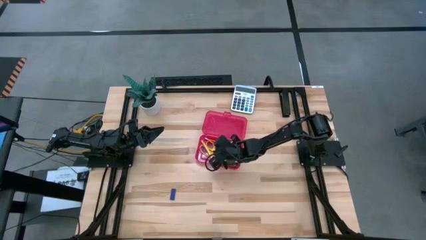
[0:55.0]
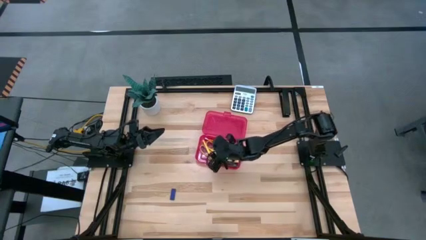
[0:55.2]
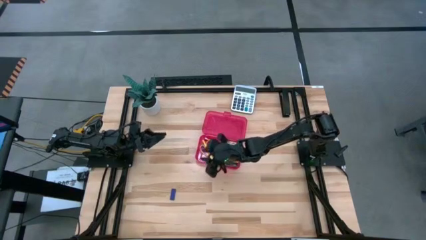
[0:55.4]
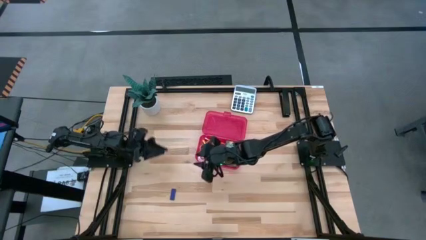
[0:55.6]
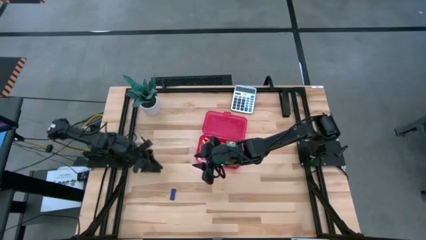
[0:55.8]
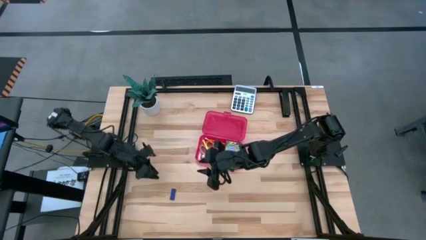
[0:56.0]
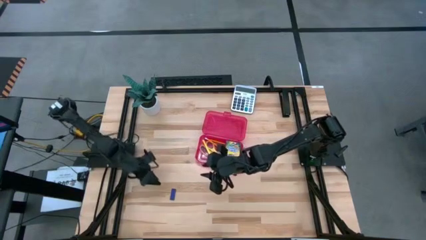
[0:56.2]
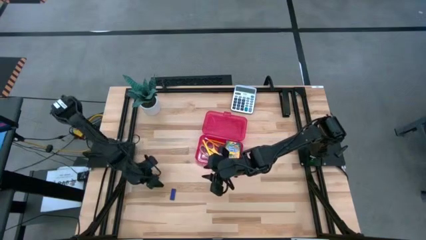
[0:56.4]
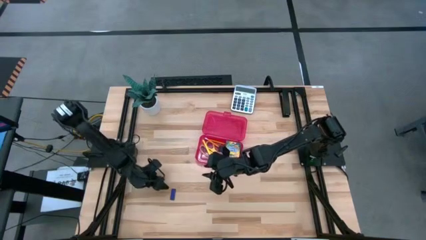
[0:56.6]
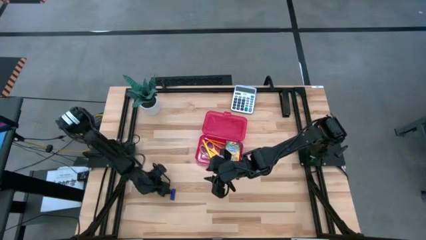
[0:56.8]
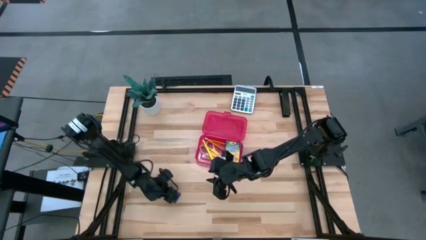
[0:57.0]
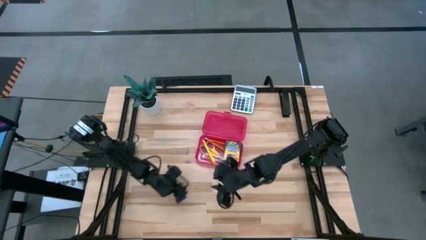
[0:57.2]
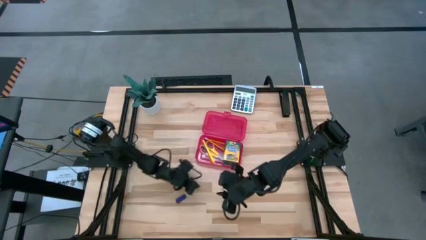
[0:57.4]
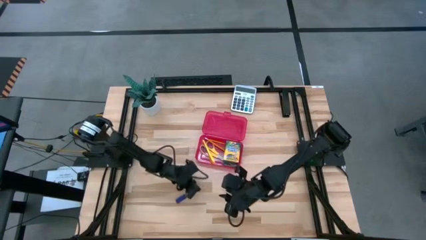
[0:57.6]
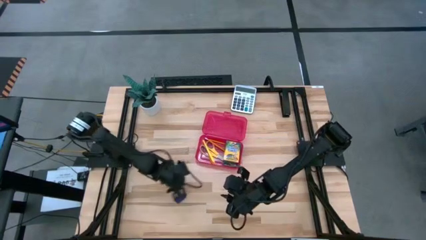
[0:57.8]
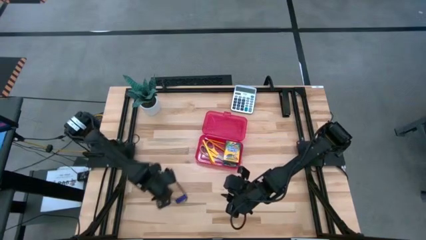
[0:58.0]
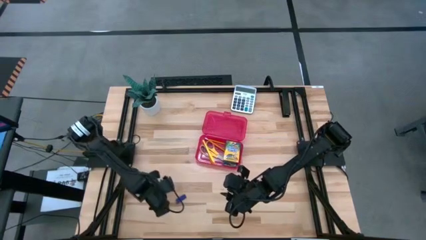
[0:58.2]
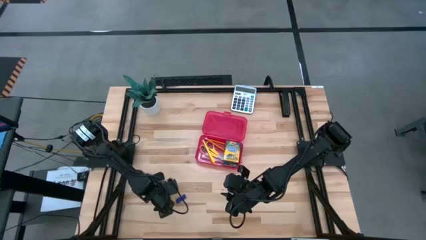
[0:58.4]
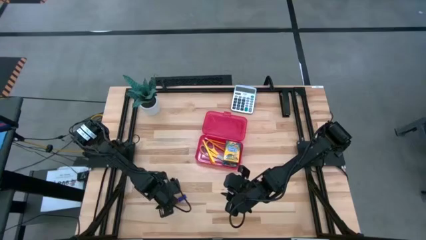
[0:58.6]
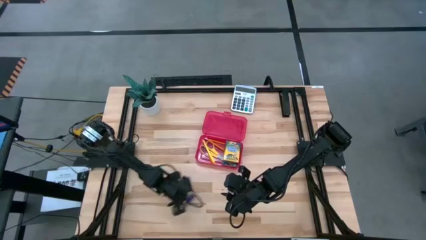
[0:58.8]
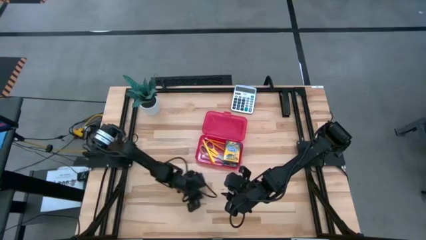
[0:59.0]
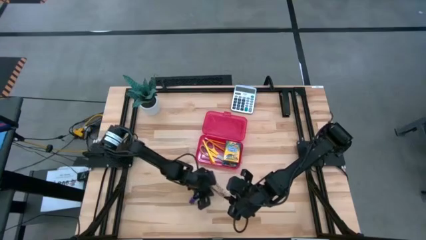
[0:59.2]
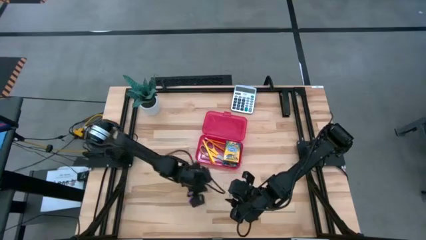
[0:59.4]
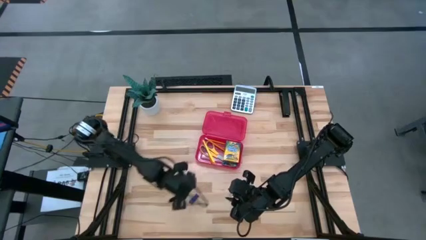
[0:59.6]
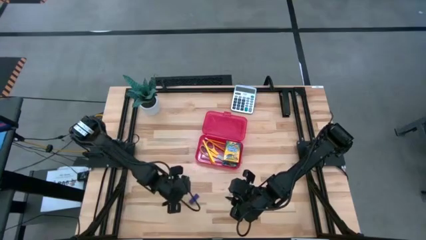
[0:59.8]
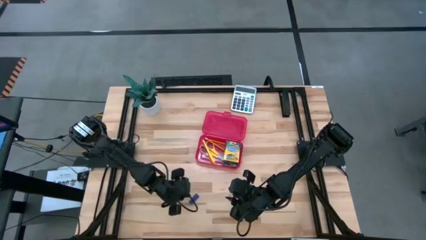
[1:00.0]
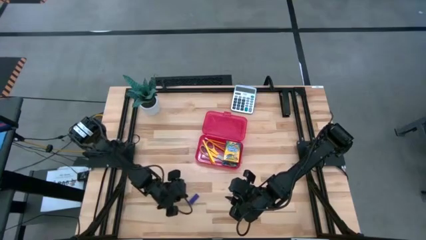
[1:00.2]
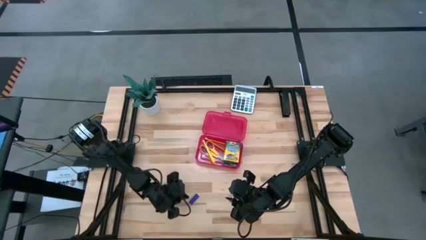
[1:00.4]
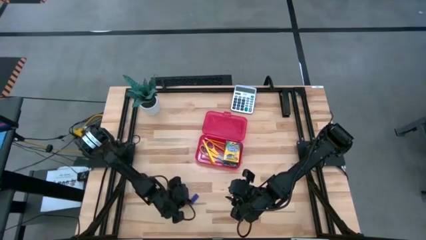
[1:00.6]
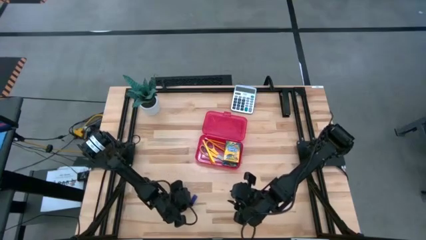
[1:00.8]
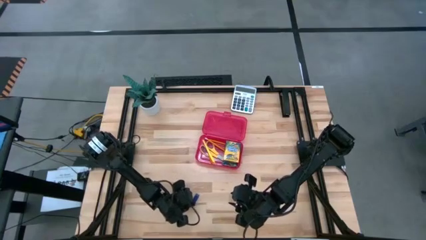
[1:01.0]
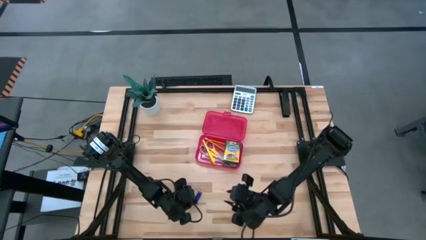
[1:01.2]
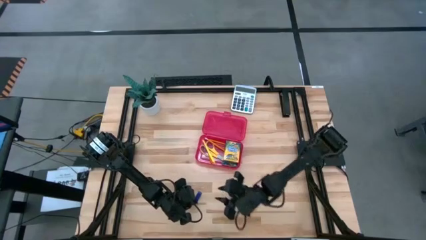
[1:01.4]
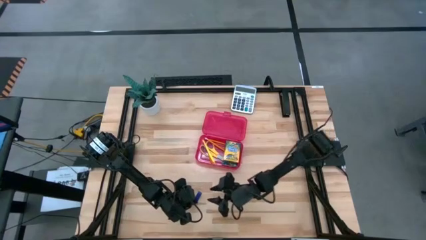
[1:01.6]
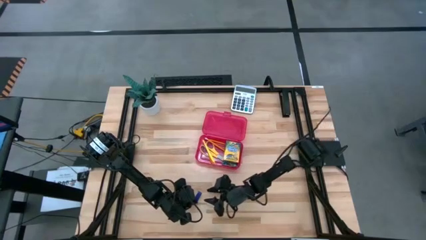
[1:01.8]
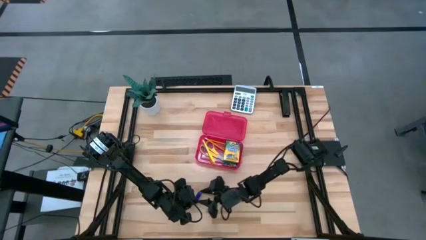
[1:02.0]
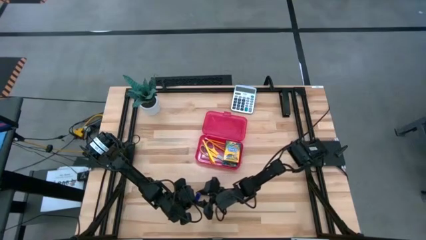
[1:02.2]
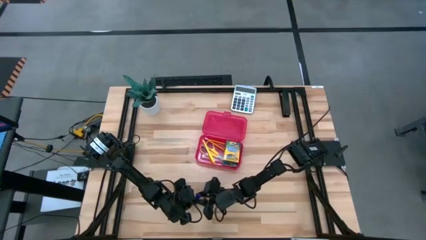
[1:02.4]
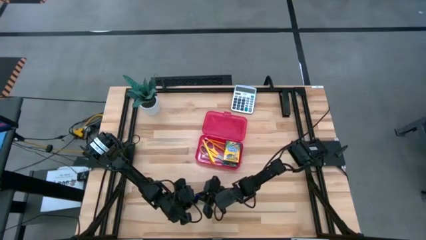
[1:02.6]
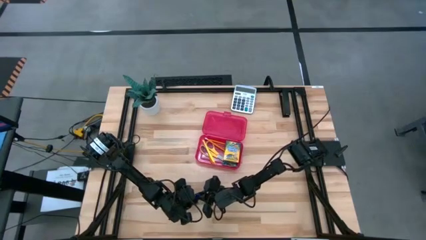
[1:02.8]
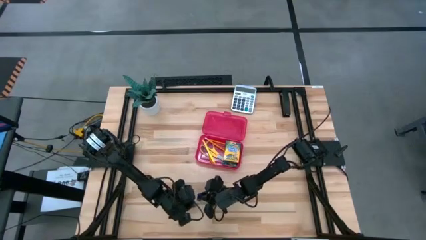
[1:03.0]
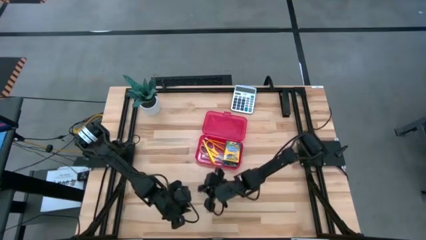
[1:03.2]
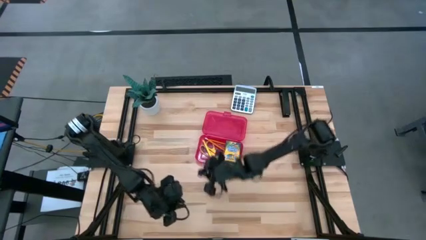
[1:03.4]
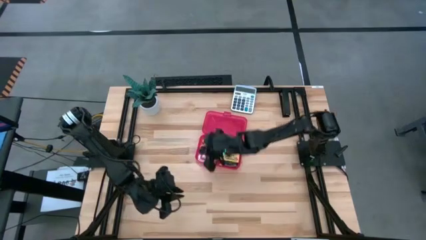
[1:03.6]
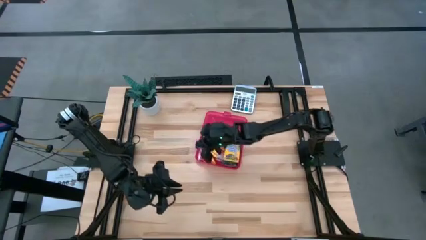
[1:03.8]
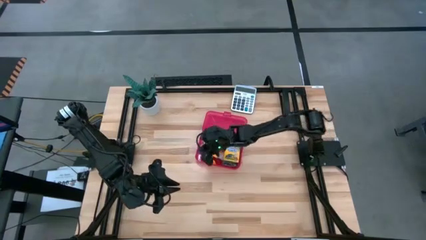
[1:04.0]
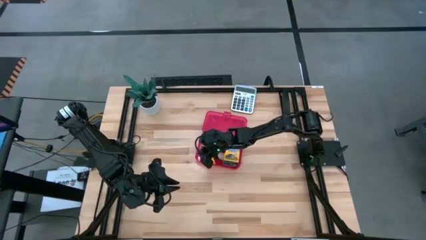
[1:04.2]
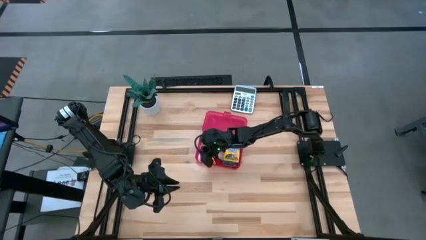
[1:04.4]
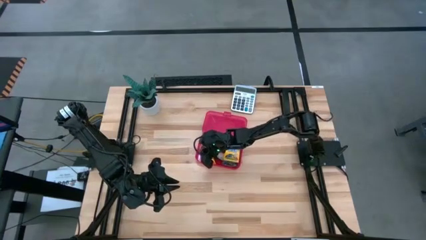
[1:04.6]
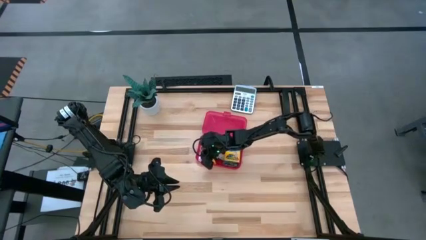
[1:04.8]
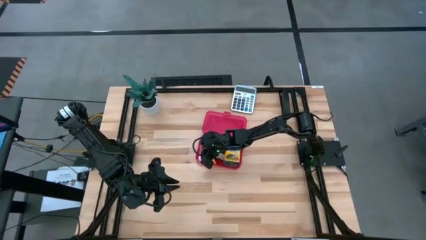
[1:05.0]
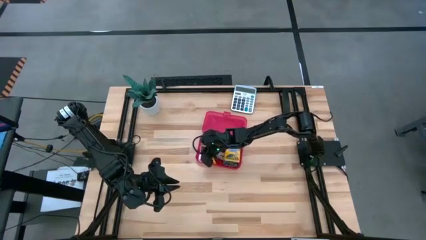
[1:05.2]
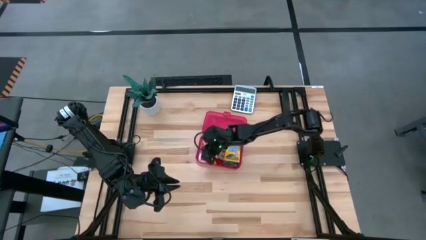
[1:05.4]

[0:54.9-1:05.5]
Task: Pack school essentials
Put the blue eraser into the red supply box

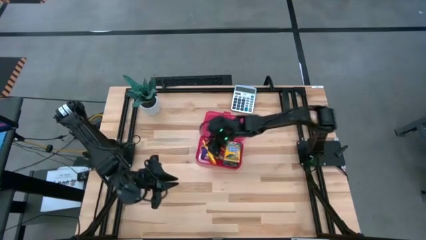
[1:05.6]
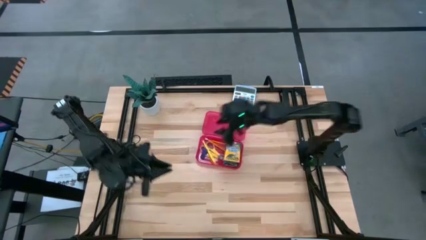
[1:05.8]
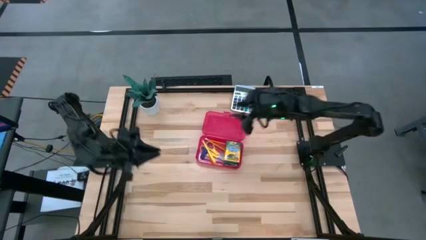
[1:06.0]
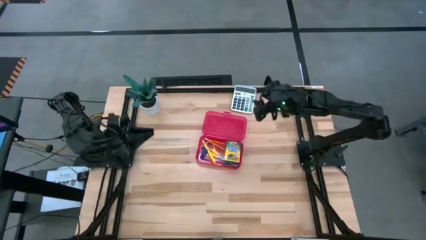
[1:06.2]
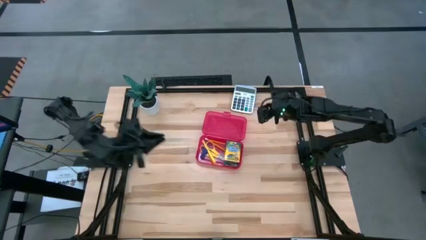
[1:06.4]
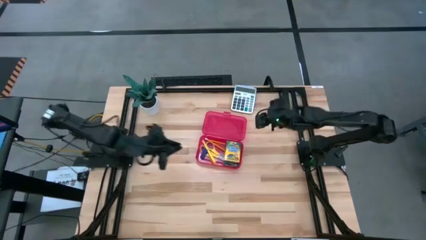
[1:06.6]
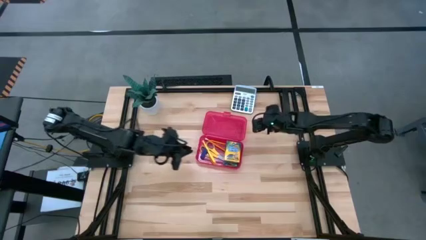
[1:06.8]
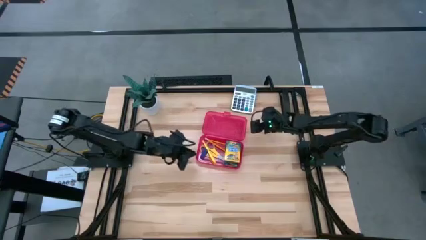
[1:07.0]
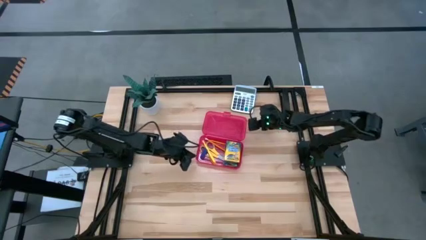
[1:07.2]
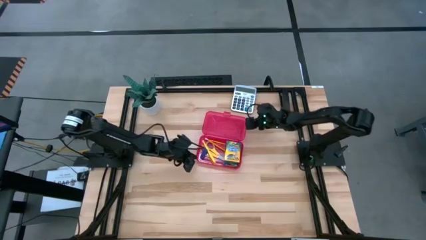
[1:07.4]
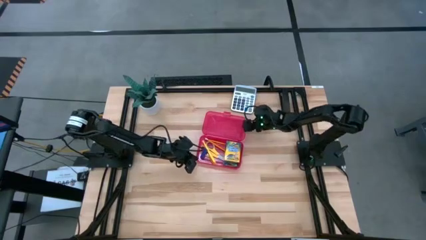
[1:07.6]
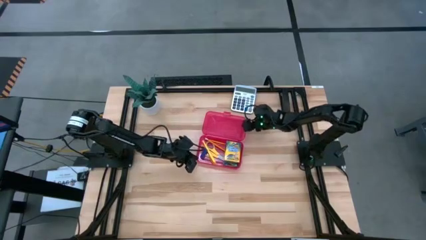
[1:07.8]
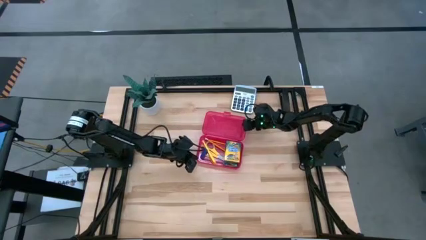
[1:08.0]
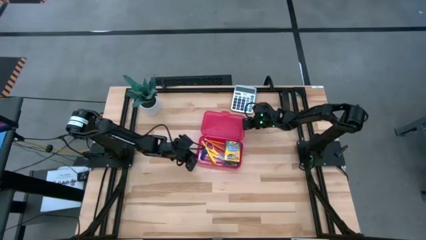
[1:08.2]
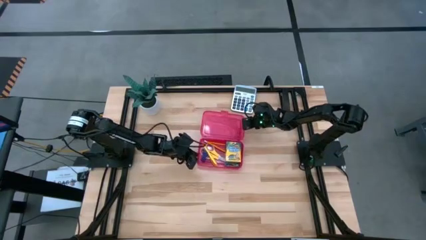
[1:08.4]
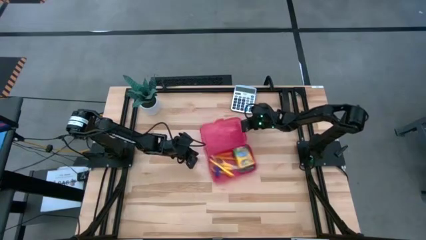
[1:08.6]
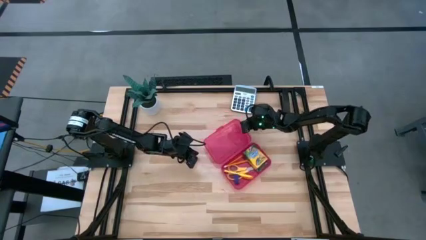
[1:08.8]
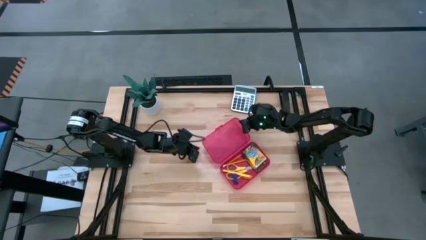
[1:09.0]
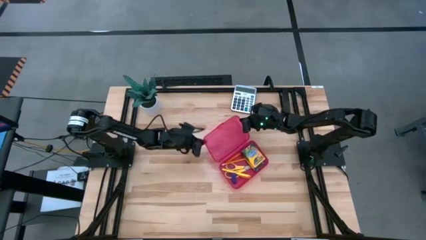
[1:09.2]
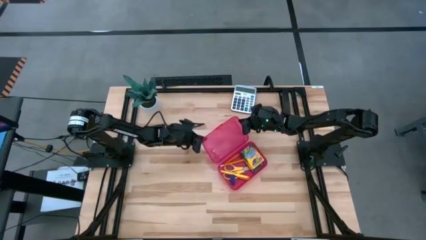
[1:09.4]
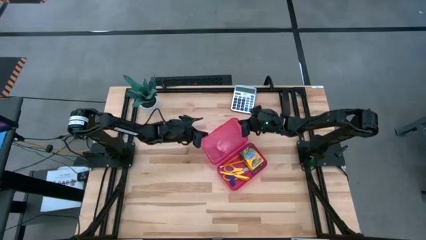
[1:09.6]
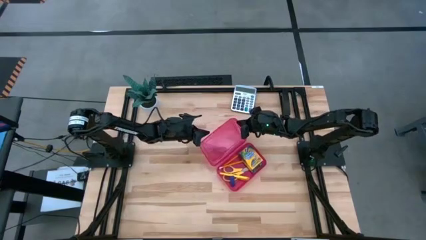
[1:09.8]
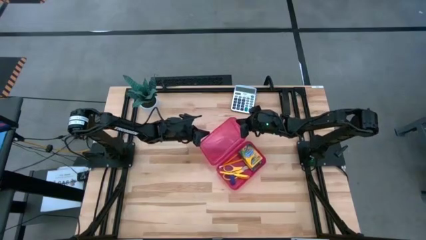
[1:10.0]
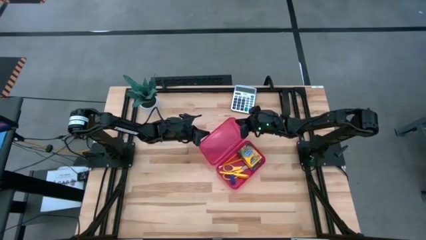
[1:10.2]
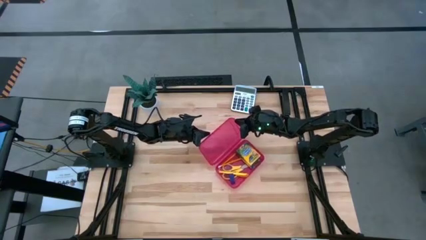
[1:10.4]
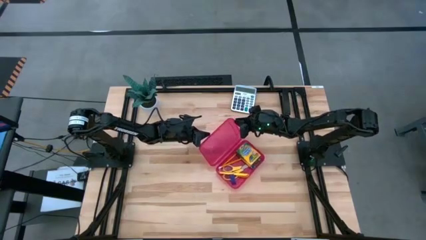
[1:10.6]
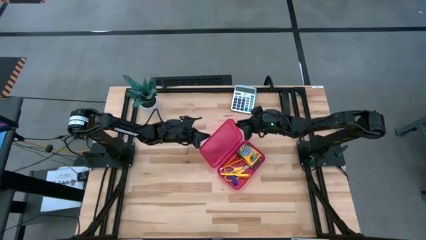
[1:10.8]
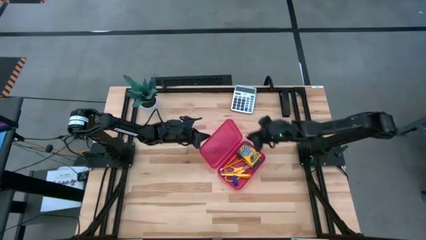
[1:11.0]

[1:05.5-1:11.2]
Close the red supply box

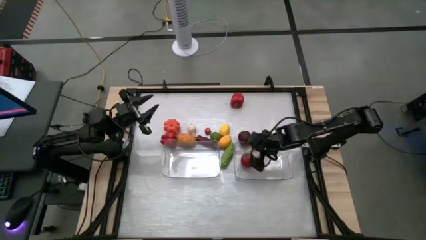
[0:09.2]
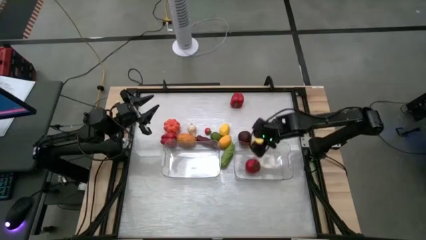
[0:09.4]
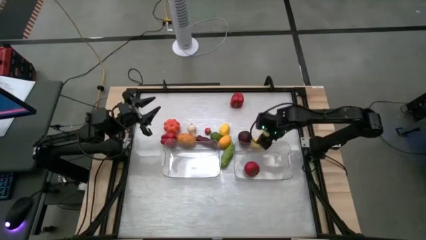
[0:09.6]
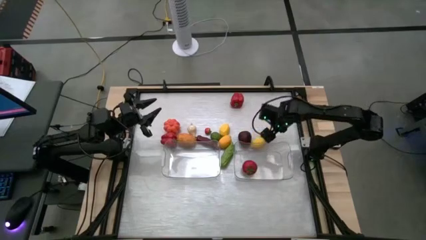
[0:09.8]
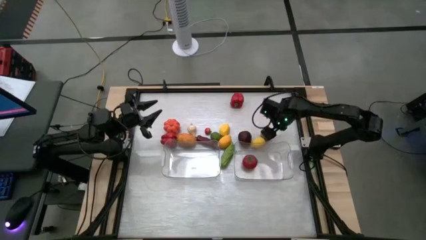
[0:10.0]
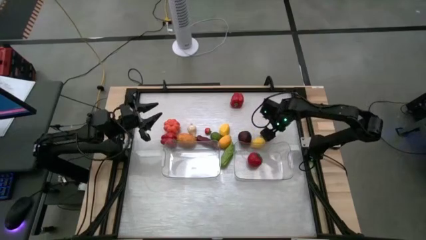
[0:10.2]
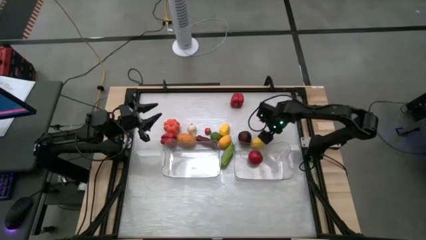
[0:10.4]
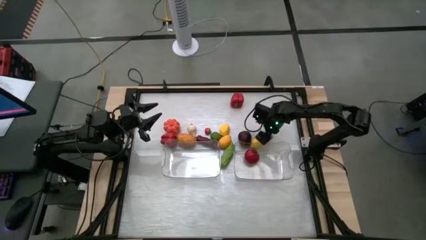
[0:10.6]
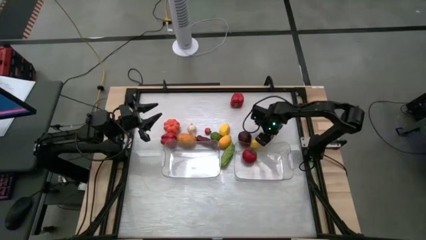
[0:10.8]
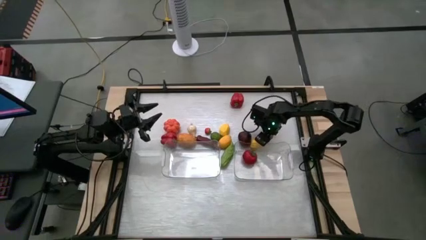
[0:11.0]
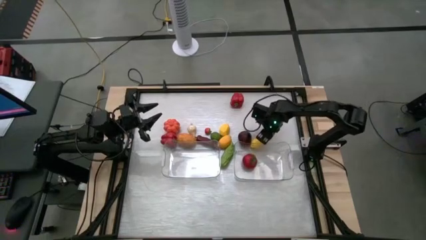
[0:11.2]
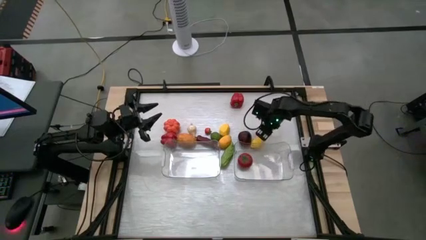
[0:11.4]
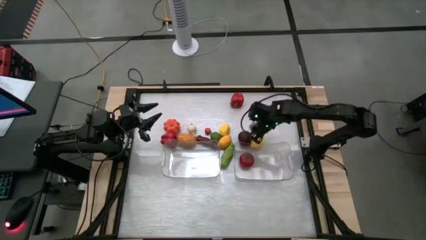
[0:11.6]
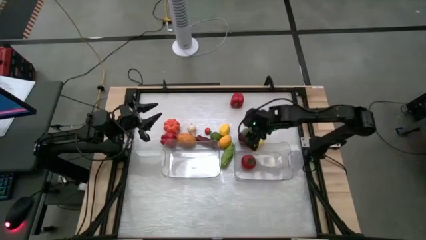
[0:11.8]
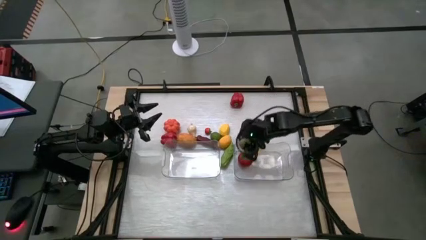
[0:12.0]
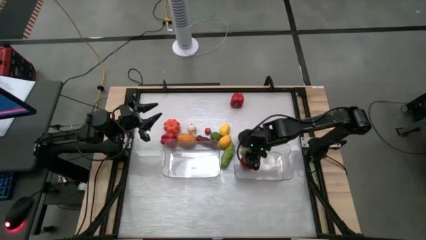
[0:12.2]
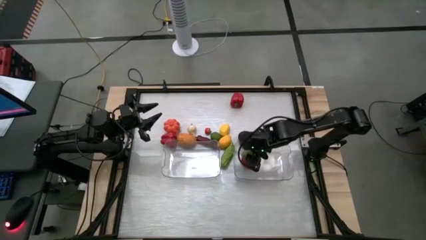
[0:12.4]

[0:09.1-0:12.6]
Task: Sort produce into baskets
Put the right lime into the right transparent bin
